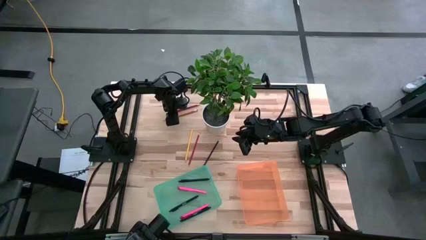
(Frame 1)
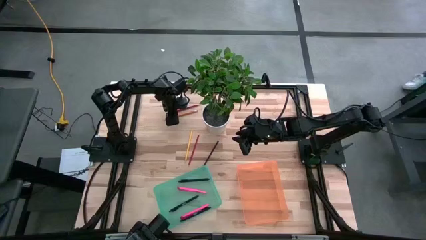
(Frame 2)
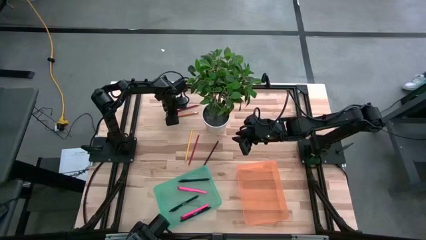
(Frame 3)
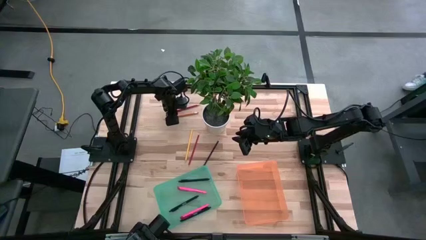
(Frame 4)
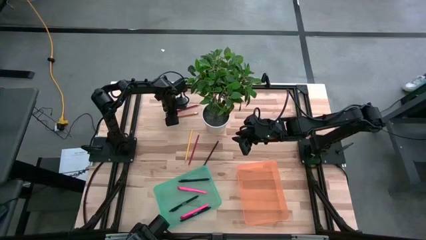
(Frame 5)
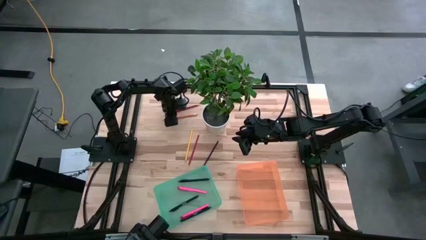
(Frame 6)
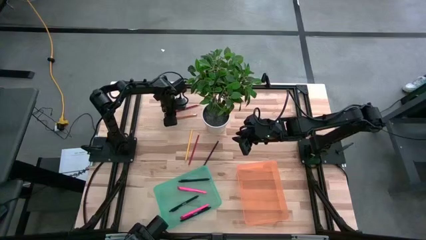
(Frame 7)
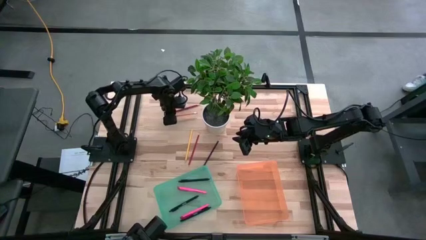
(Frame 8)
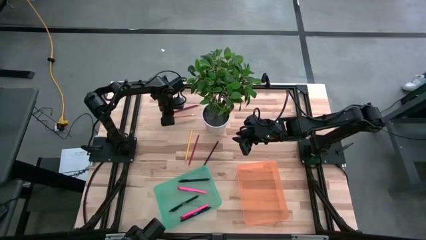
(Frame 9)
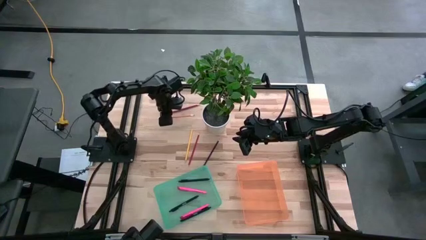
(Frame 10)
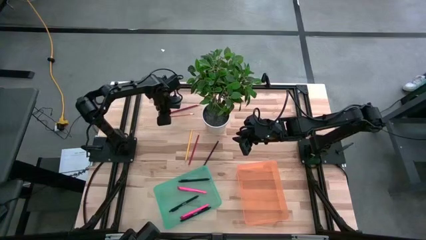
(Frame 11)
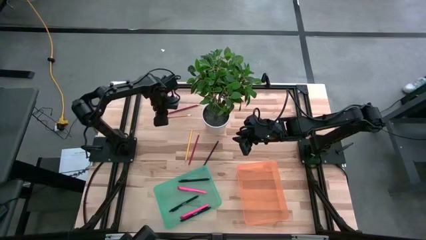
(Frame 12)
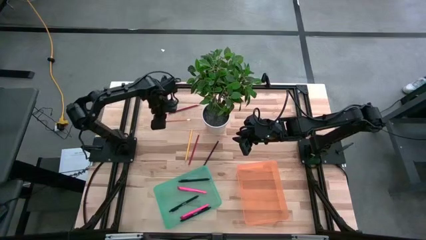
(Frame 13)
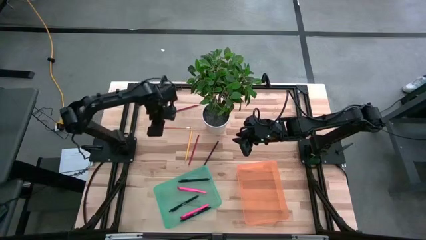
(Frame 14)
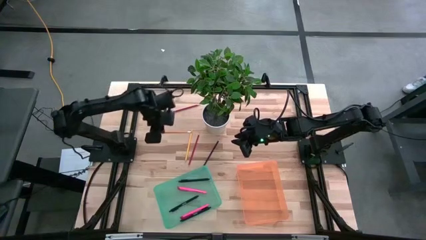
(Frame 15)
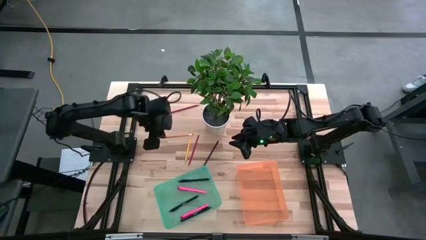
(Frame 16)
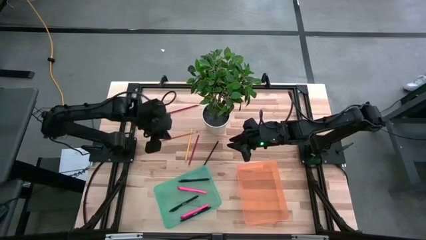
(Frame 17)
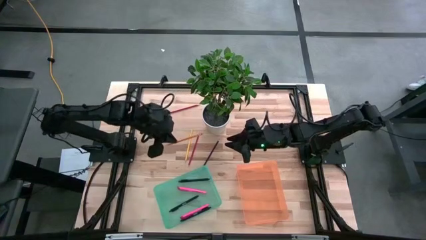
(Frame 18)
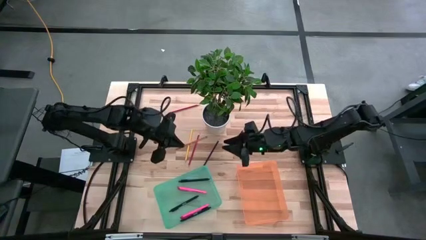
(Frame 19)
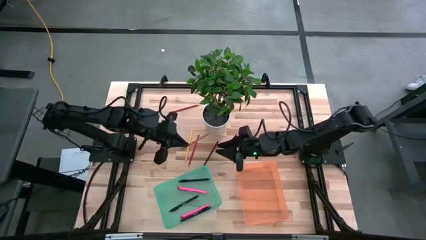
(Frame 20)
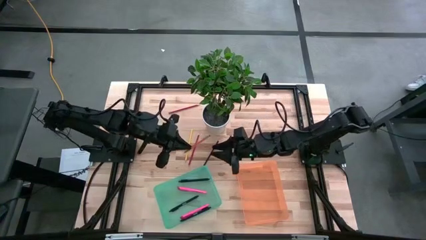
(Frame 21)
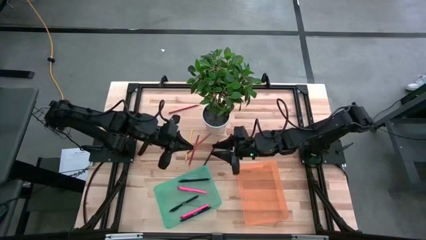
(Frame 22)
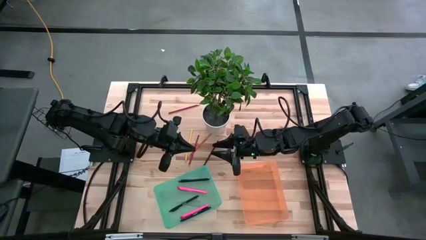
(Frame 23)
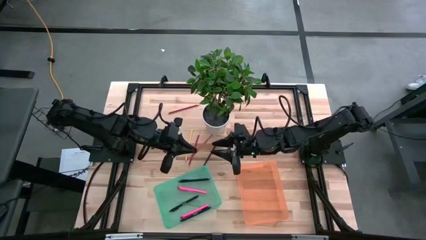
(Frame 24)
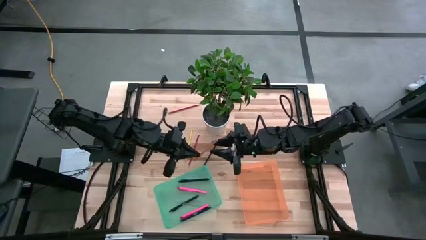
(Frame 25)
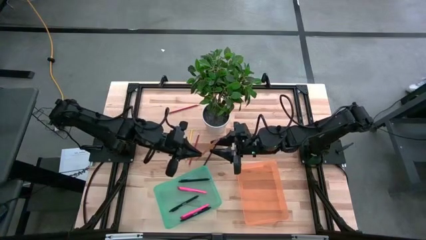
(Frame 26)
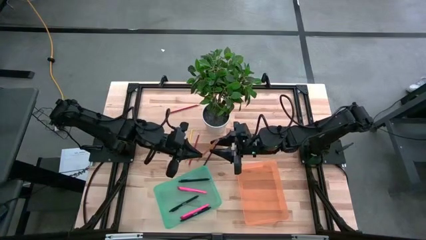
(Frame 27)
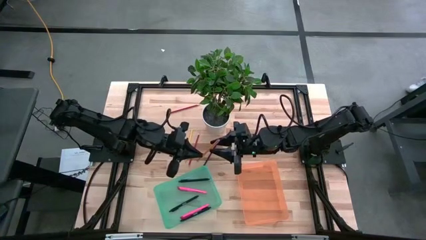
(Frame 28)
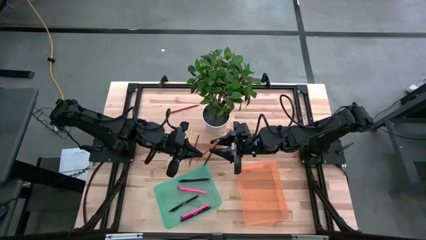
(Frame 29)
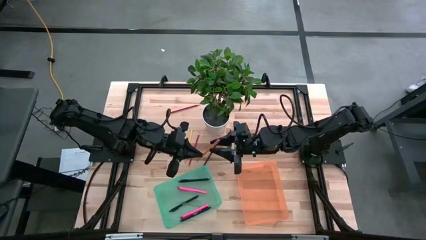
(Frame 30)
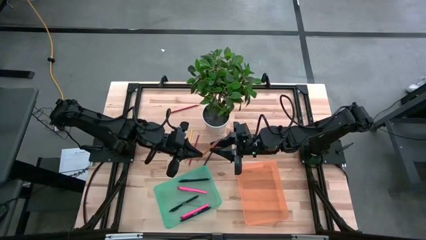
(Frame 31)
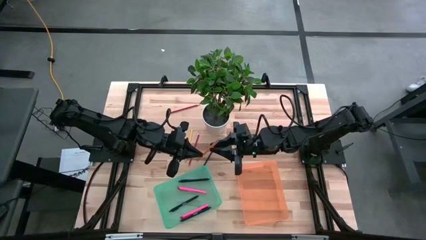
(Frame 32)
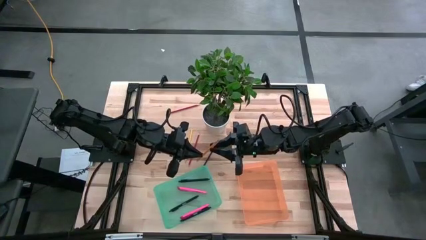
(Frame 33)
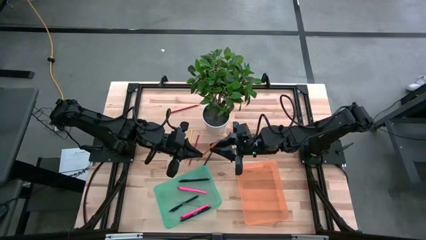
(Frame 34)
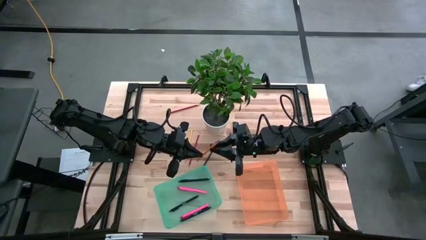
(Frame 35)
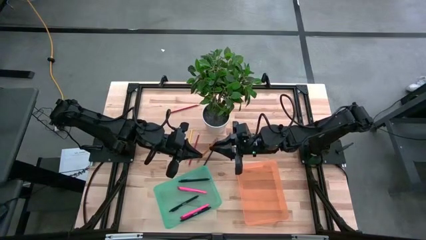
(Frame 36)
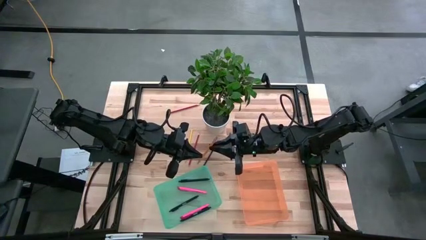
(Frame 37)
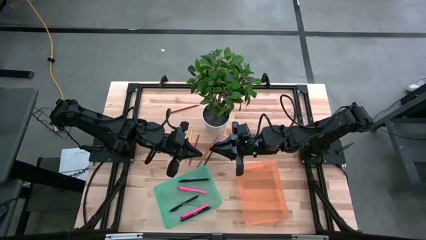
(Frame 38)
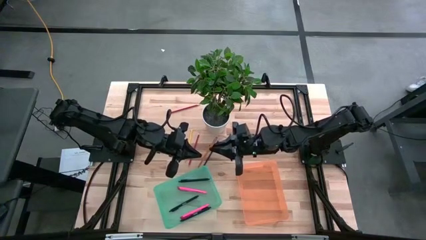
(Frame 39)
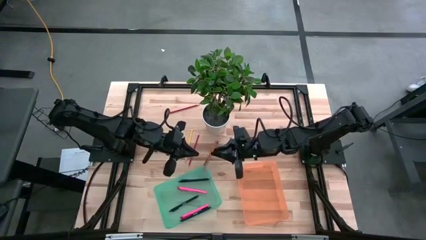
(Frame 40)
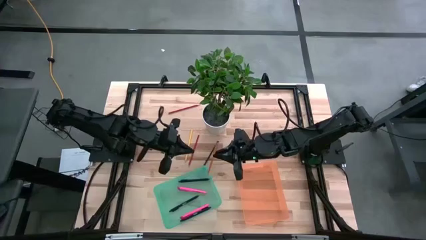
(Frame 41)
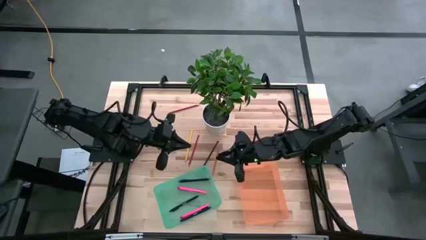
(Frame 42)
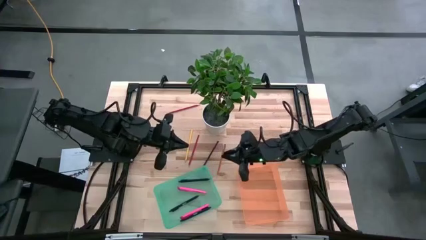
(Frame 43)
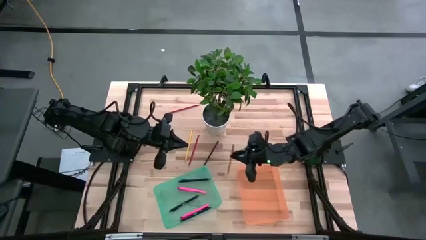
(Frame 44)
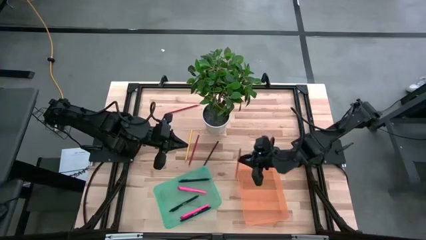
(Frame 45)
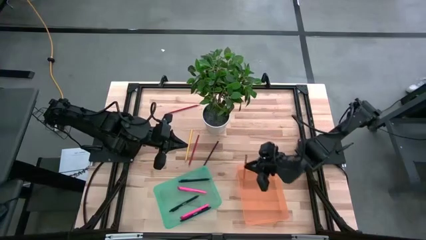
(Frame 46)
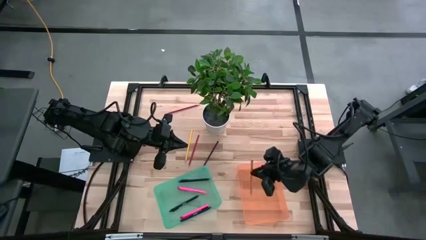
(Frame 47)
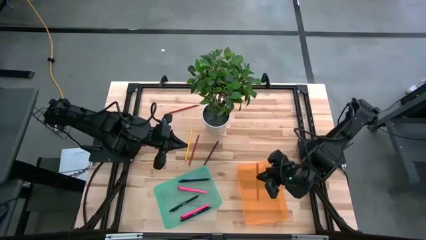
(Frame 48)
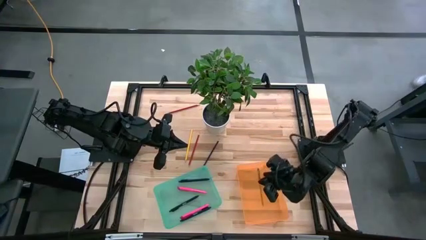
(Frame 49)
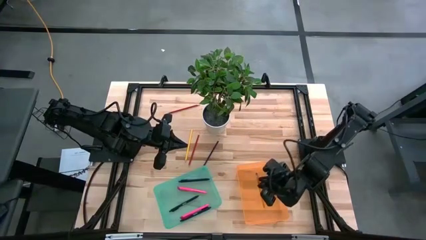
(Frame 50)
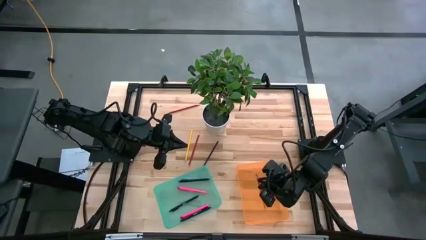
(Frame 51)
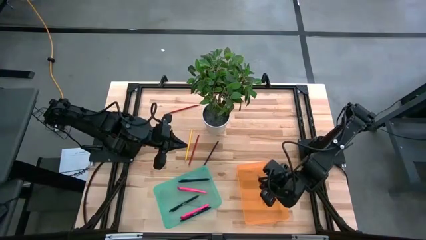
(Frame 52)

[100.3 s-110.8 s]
Task: Sort pens & pencils
Put the orange pencil into the orange bin
